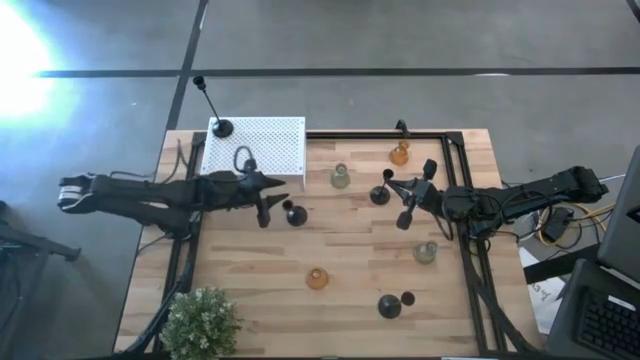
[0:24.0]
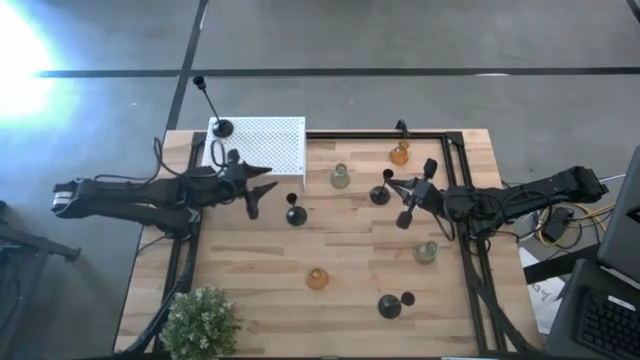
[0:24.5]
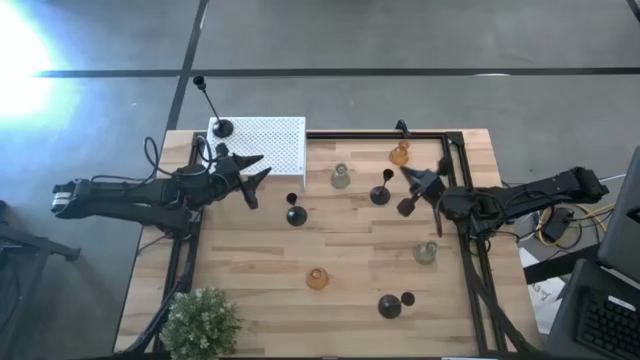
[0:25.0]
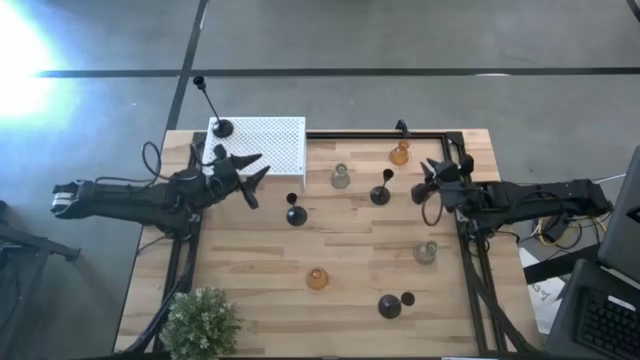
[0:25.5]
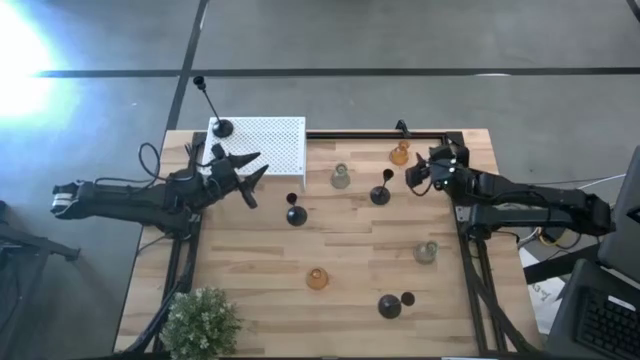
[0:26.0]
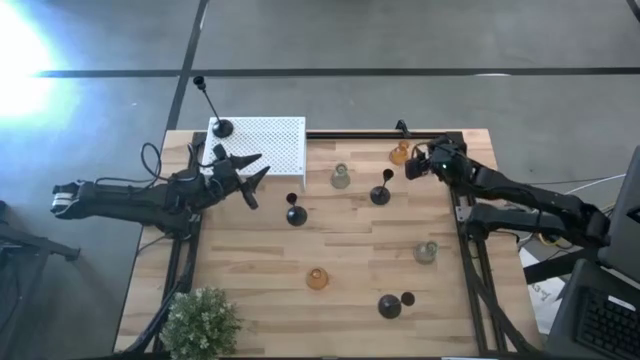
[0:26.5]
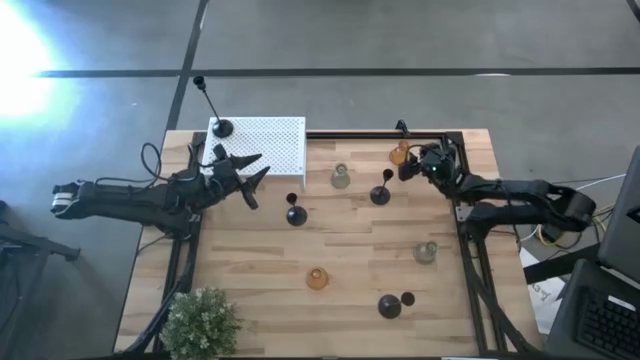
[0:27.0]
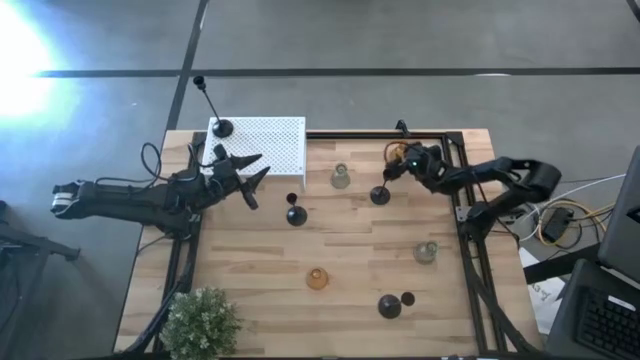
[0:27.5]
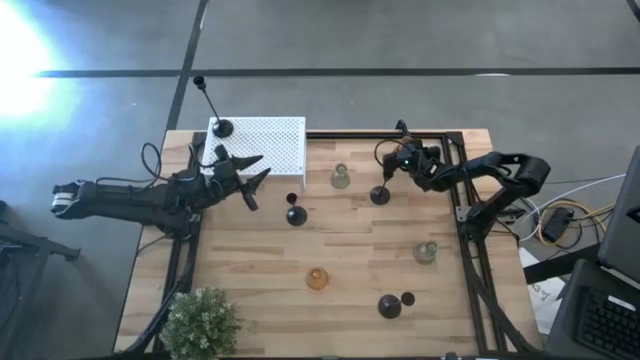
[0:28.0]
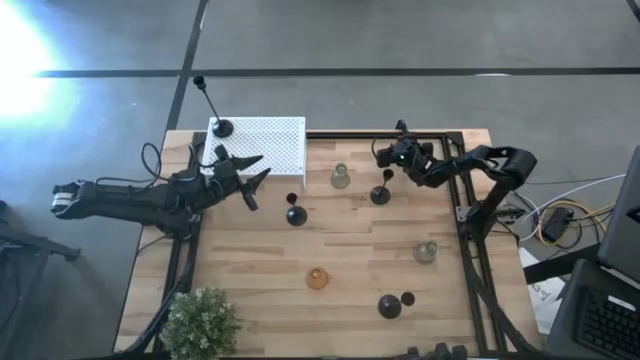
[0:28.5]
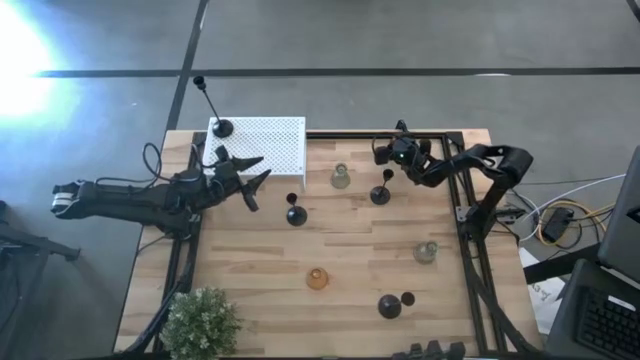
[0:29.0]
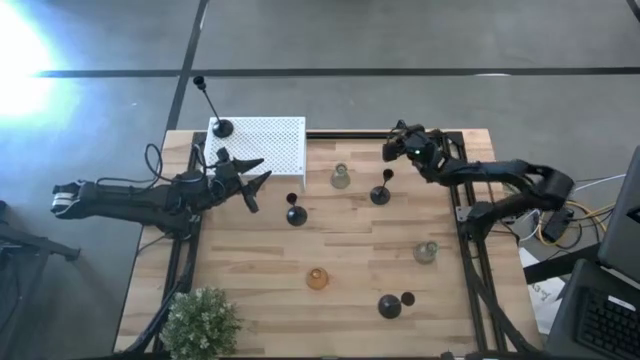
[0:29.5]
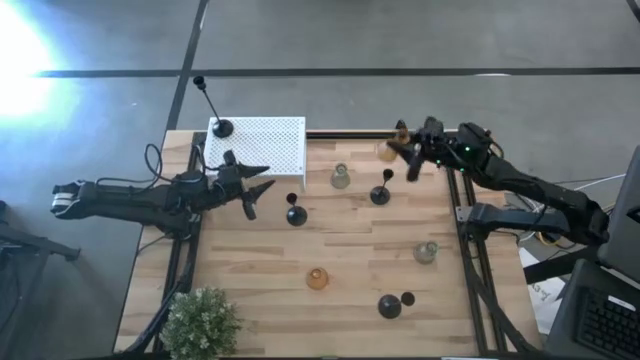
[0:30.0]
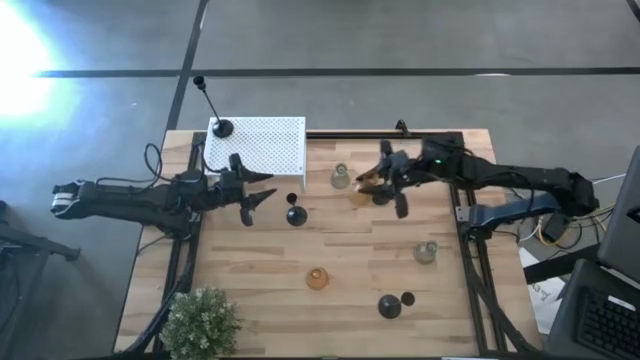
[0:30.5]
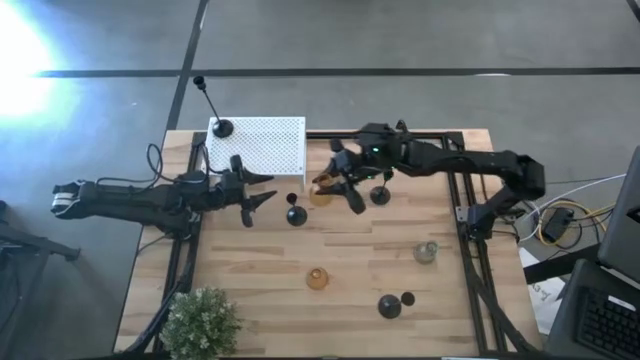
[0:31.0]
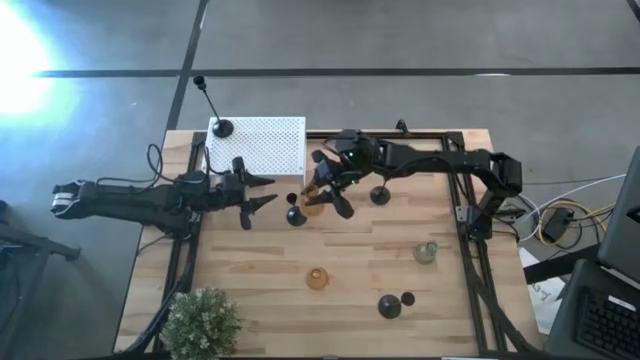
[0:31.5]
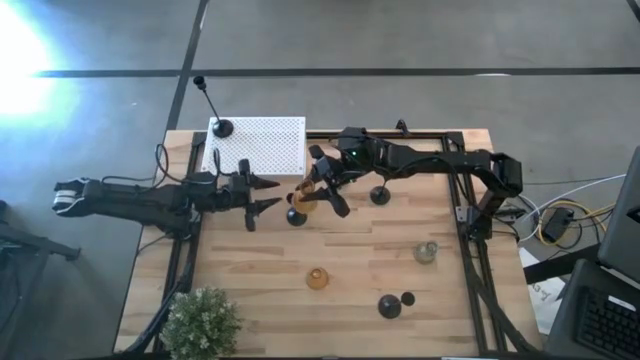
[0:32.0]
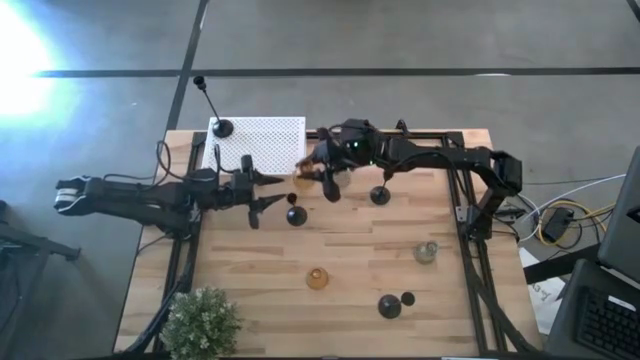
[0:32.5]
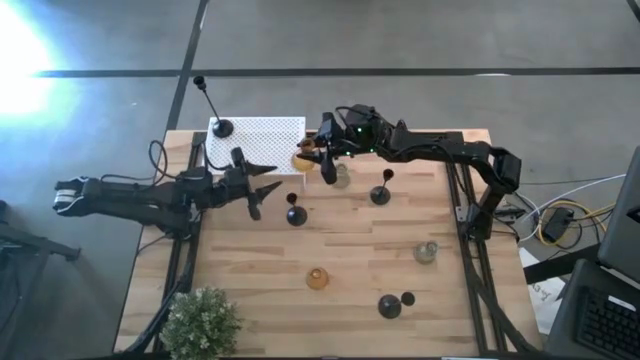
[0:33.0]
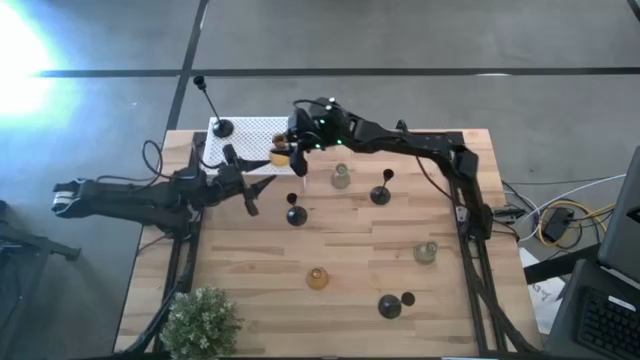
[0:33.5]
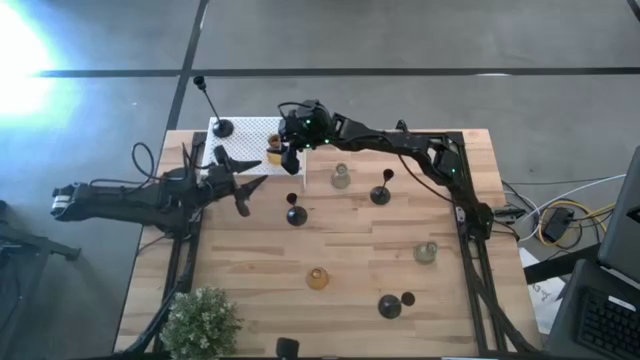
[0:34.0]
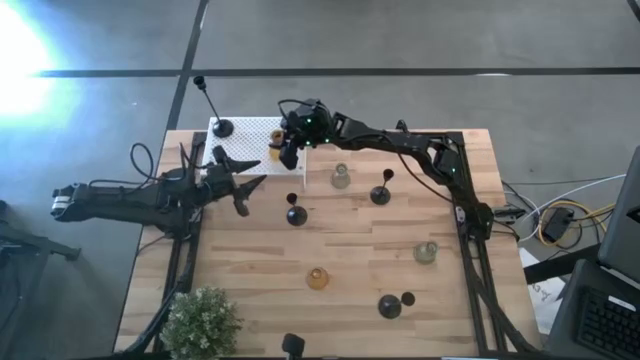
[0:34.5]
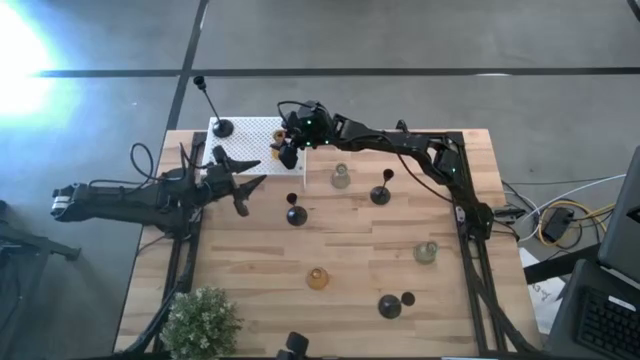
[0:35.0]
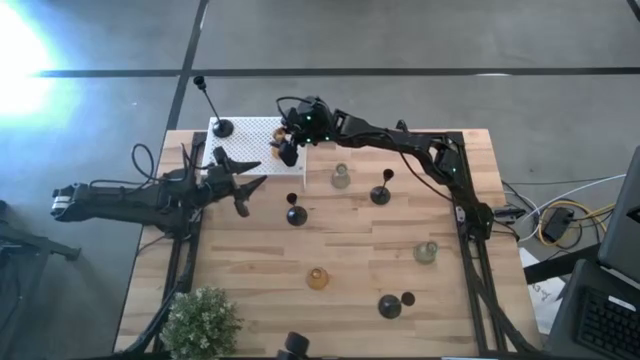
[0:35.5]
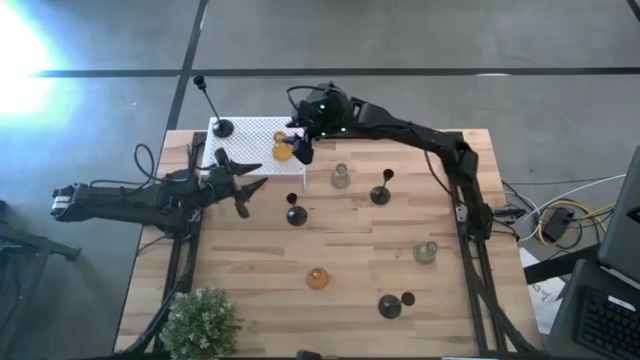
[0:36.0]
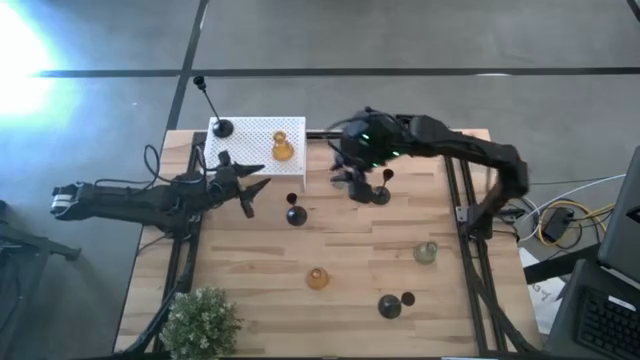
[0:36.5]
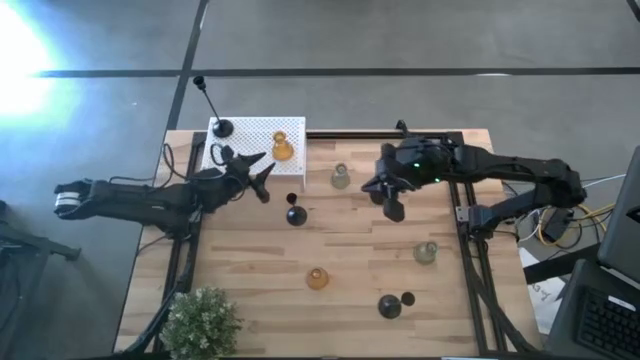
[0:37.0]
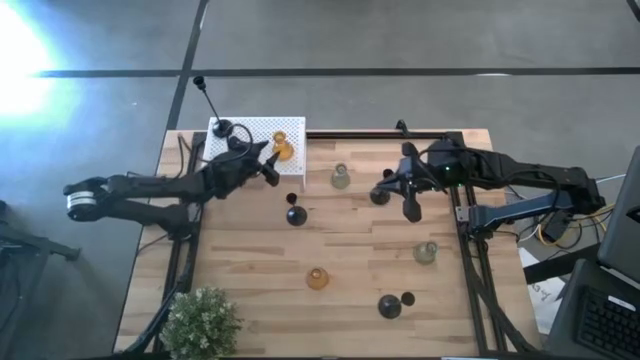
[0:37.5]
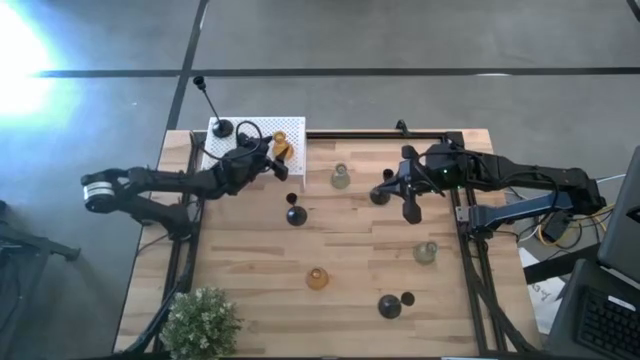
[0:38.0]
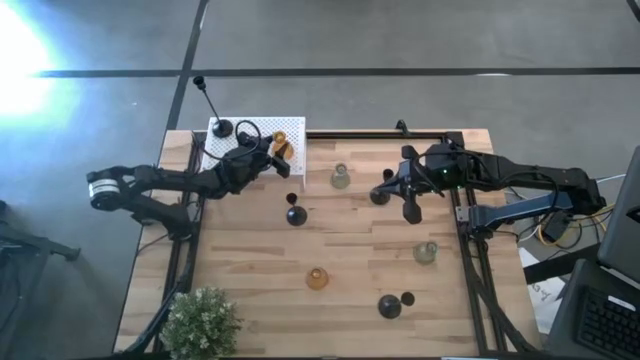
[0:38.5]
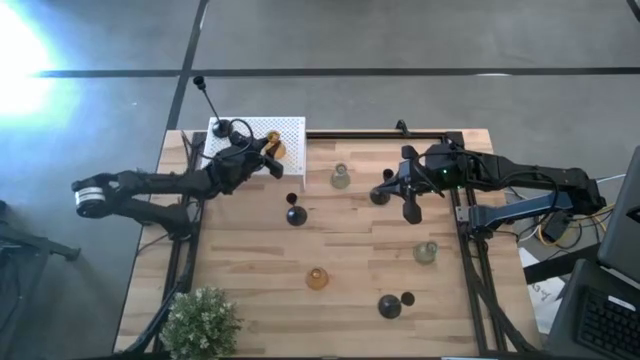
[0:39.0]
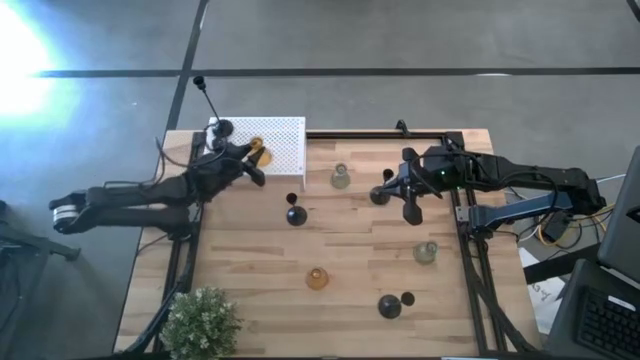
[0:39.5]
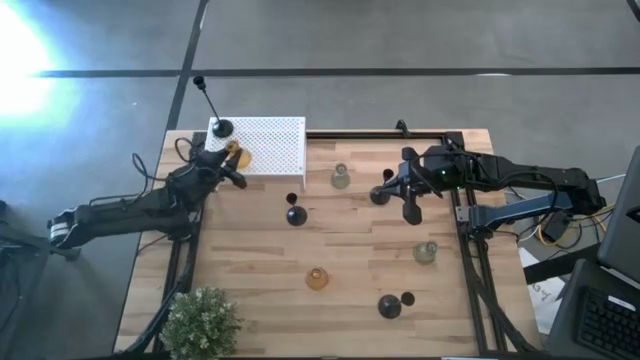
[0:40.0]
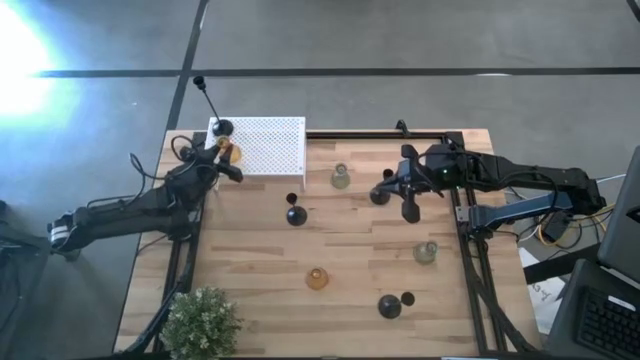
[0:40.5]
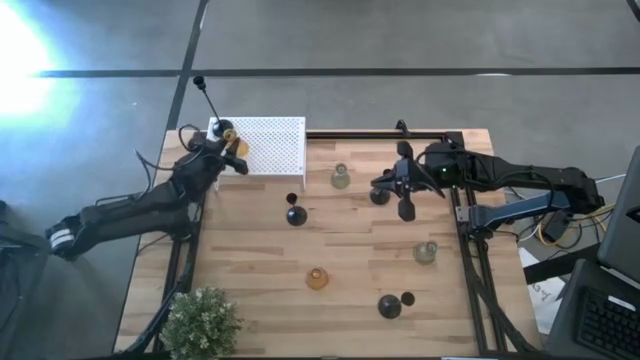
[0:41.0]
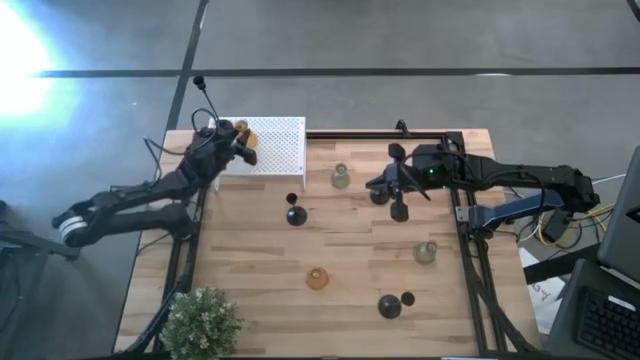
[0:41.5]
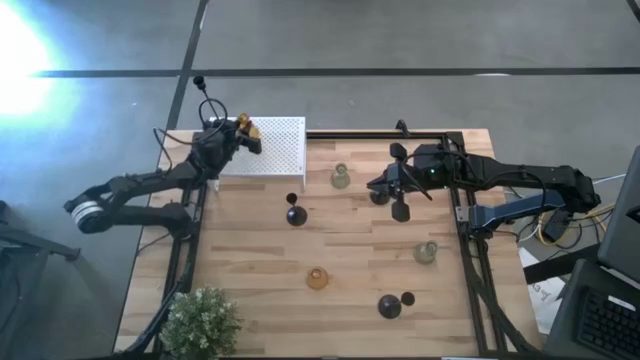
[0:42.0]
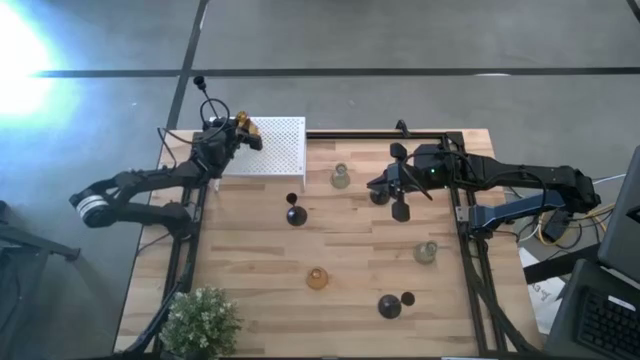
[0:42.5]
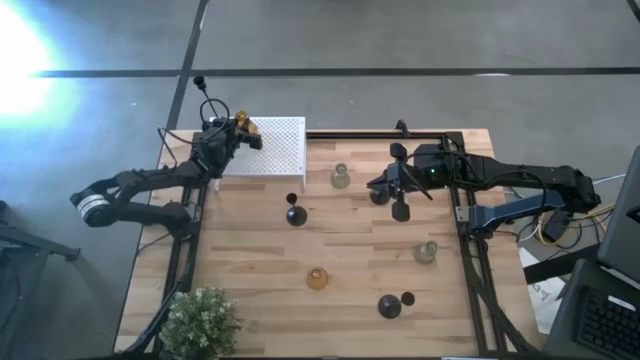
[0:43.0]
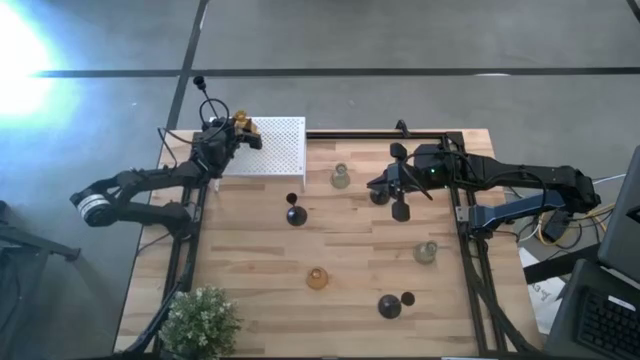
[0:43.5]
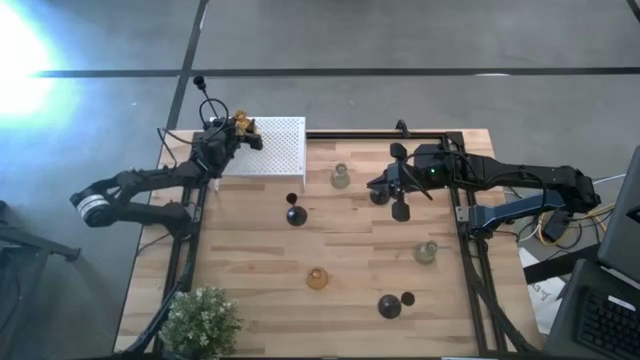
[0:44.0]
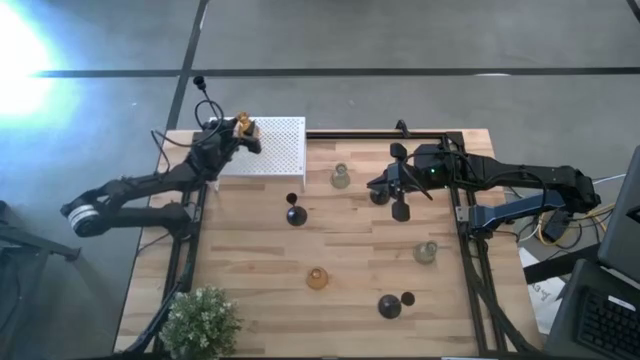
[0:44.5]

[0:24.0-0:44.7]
Task: Pick & Place candle stick holders
Put the top orange candle holder on the shelf
